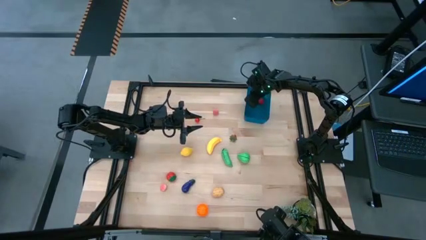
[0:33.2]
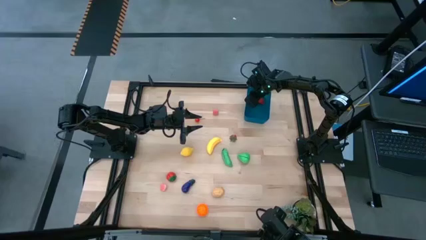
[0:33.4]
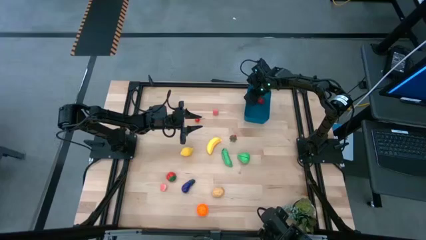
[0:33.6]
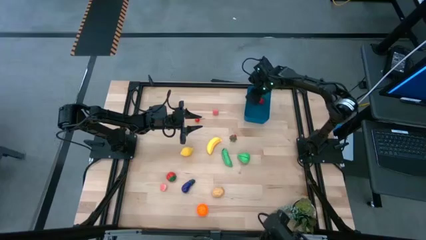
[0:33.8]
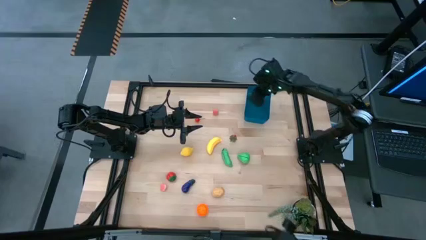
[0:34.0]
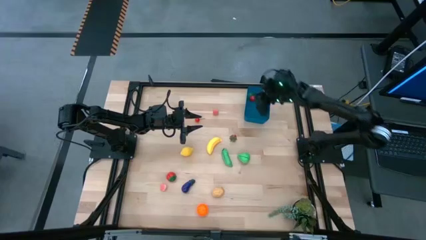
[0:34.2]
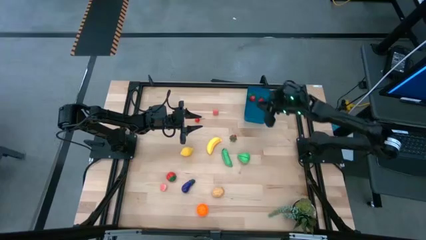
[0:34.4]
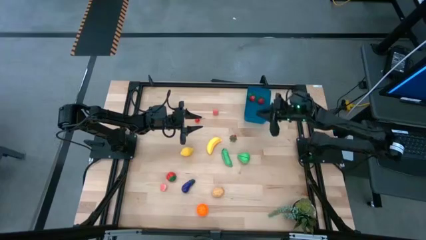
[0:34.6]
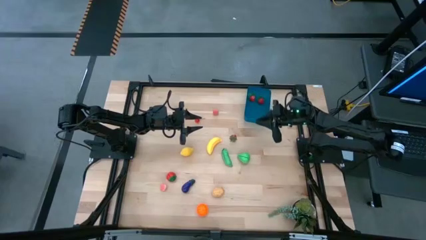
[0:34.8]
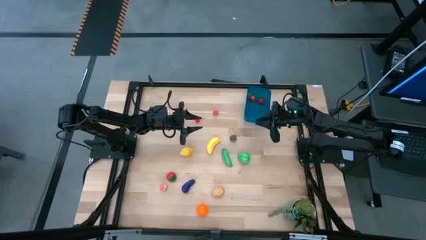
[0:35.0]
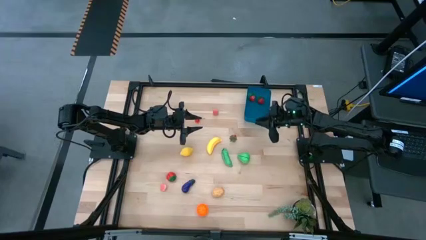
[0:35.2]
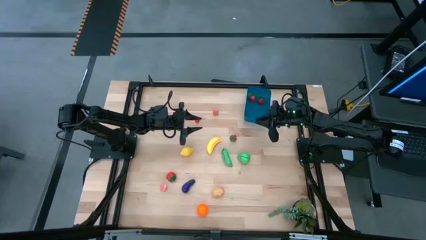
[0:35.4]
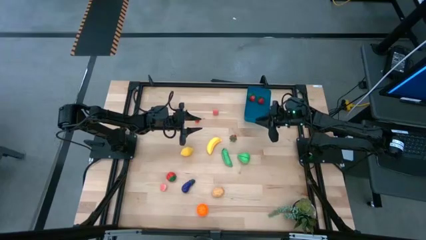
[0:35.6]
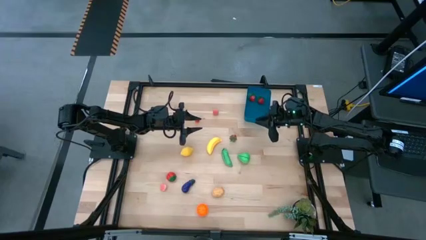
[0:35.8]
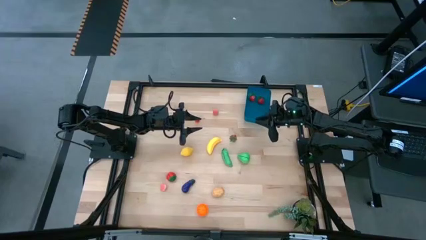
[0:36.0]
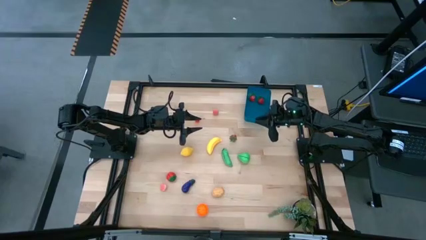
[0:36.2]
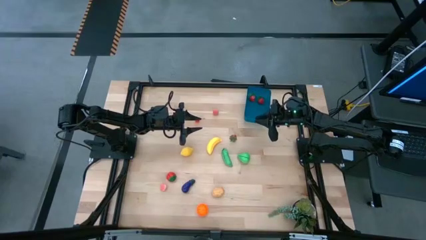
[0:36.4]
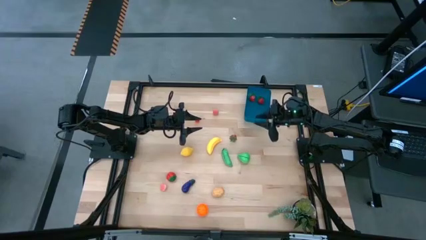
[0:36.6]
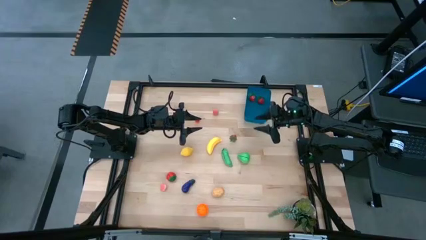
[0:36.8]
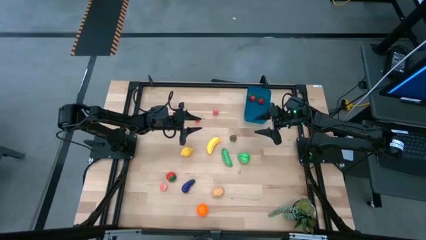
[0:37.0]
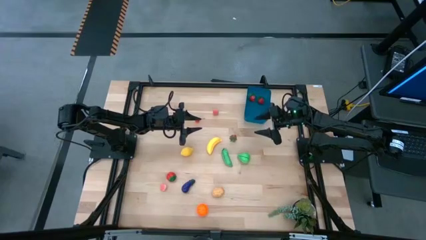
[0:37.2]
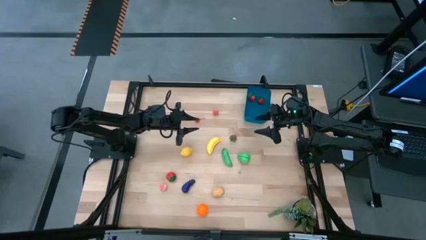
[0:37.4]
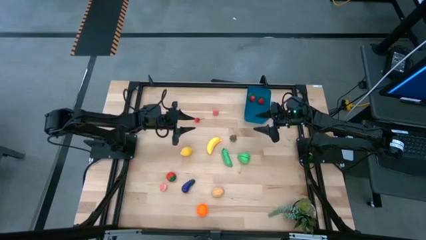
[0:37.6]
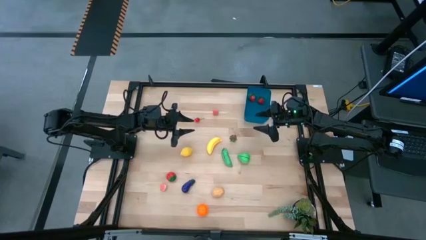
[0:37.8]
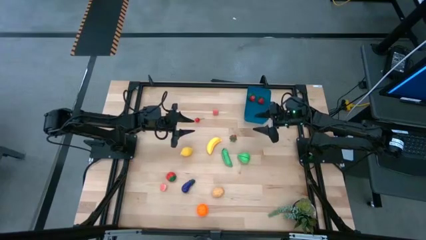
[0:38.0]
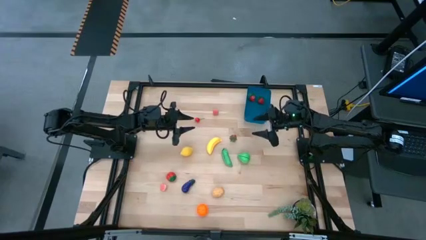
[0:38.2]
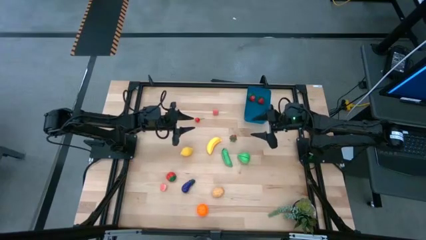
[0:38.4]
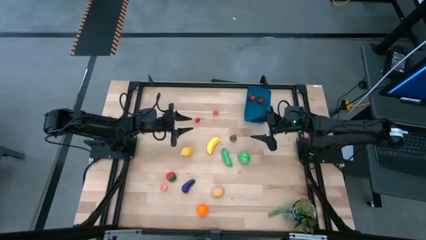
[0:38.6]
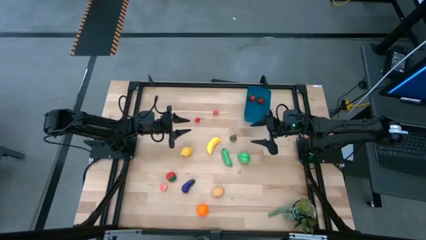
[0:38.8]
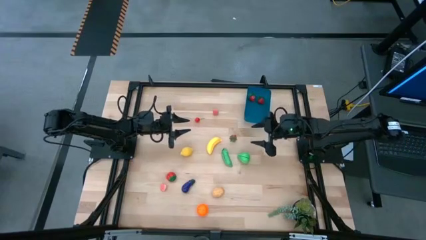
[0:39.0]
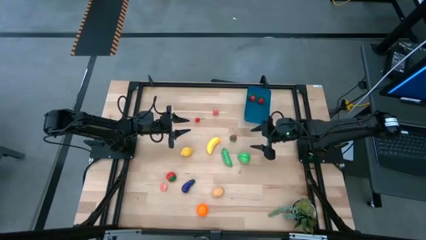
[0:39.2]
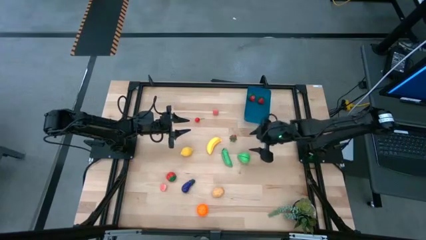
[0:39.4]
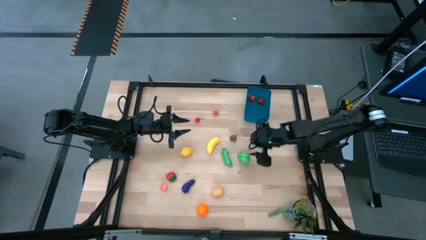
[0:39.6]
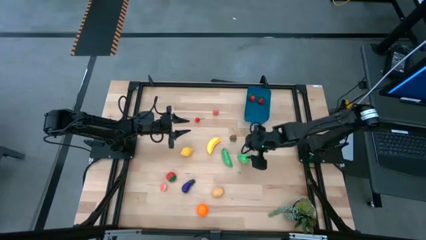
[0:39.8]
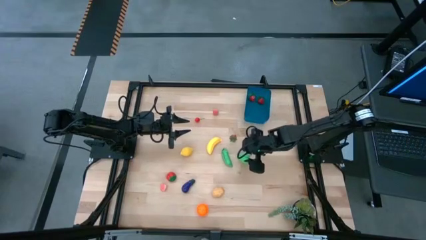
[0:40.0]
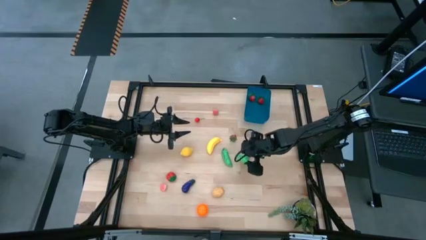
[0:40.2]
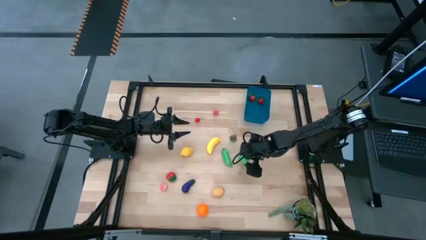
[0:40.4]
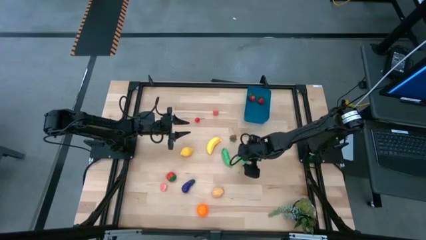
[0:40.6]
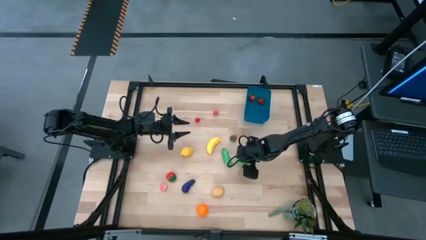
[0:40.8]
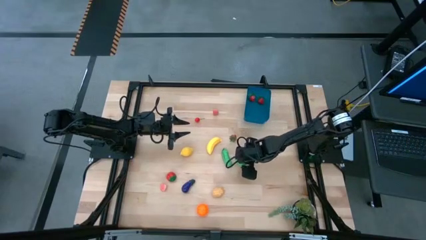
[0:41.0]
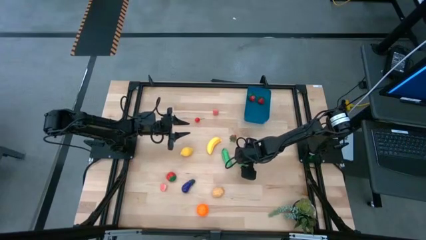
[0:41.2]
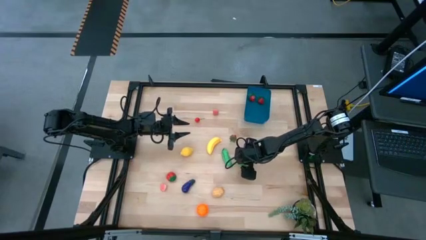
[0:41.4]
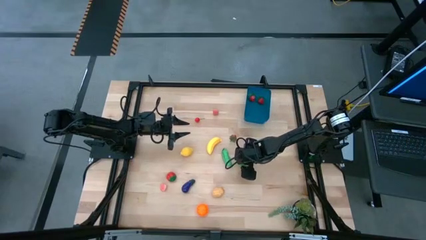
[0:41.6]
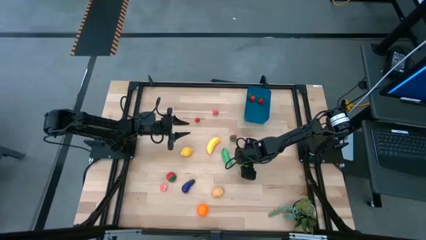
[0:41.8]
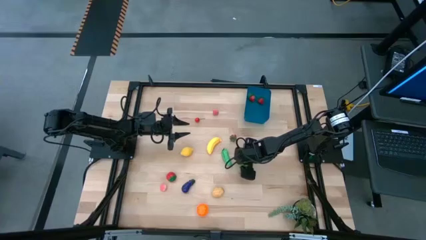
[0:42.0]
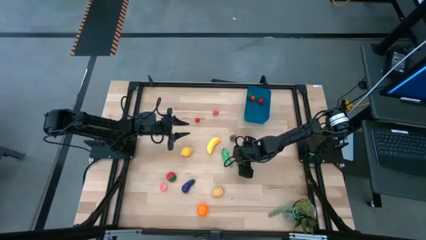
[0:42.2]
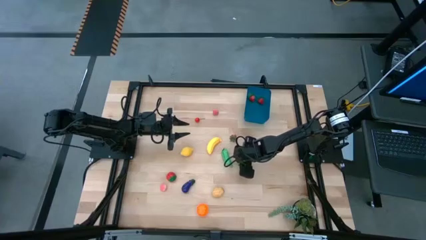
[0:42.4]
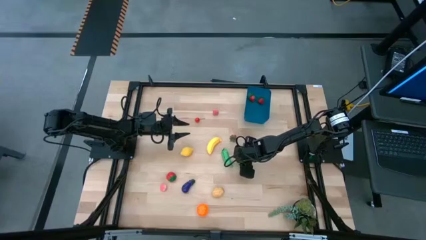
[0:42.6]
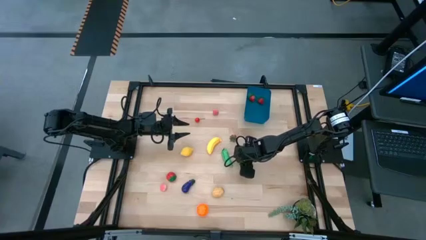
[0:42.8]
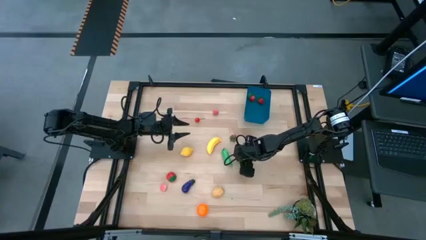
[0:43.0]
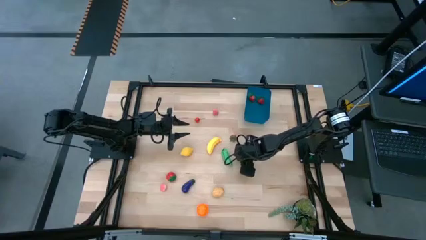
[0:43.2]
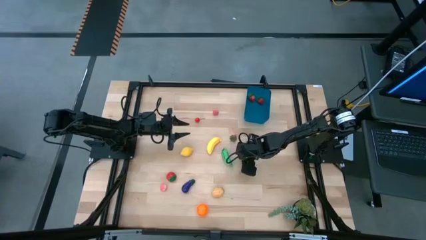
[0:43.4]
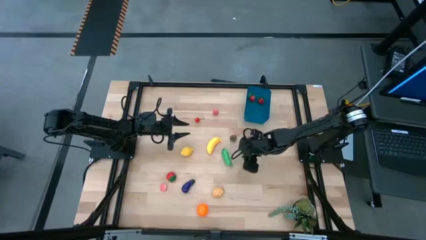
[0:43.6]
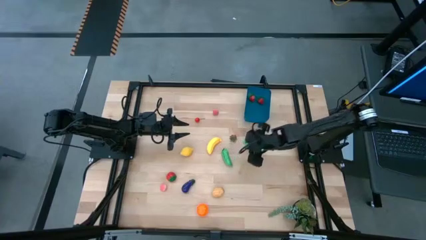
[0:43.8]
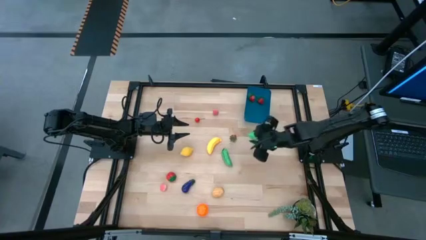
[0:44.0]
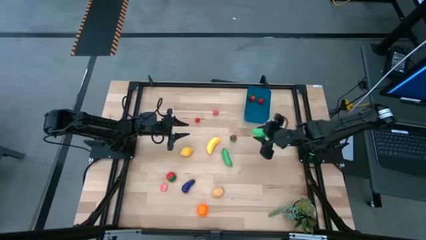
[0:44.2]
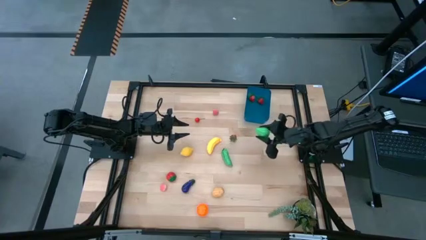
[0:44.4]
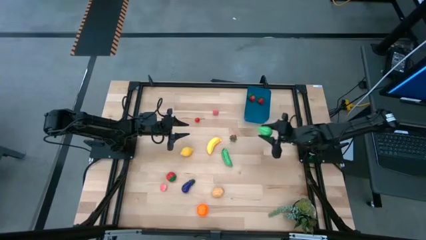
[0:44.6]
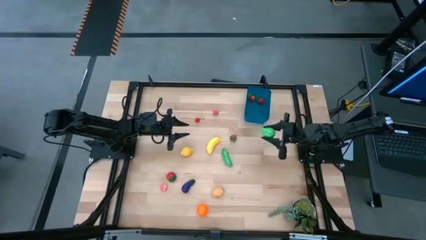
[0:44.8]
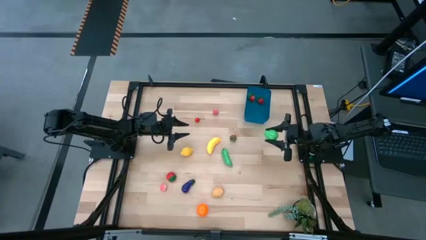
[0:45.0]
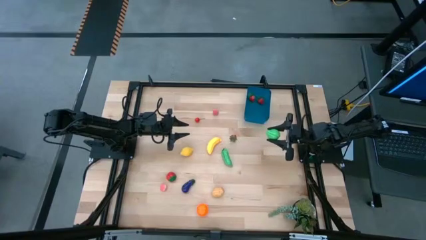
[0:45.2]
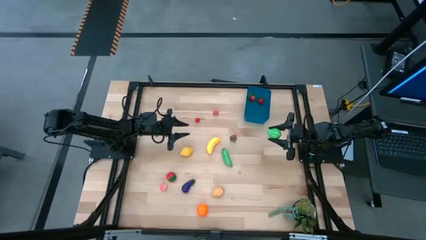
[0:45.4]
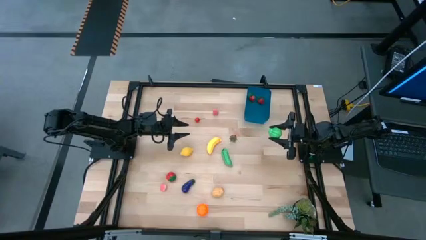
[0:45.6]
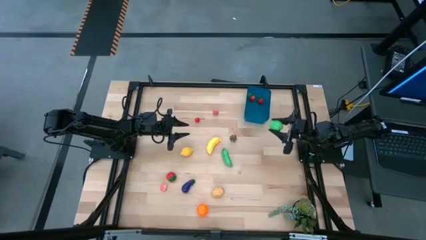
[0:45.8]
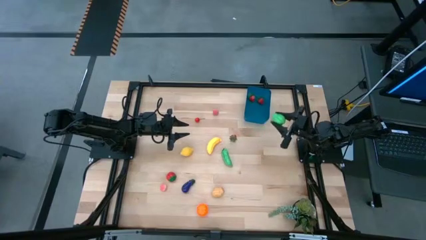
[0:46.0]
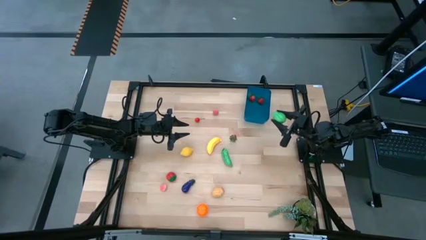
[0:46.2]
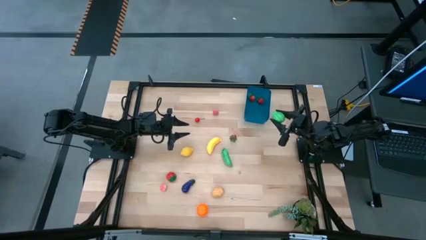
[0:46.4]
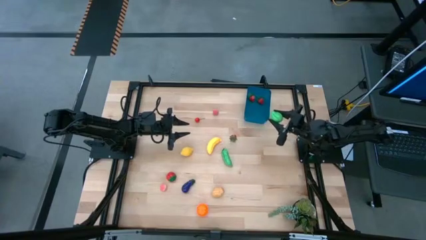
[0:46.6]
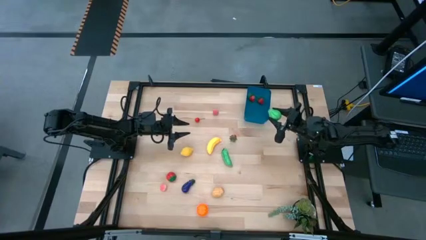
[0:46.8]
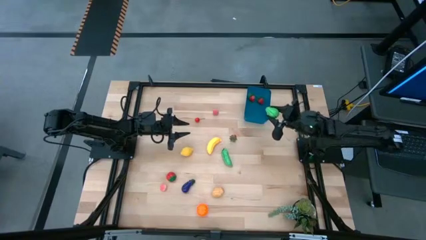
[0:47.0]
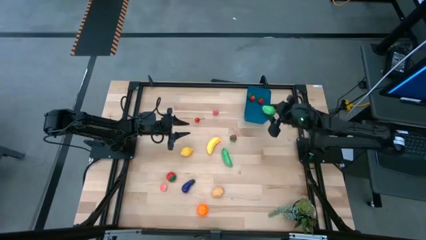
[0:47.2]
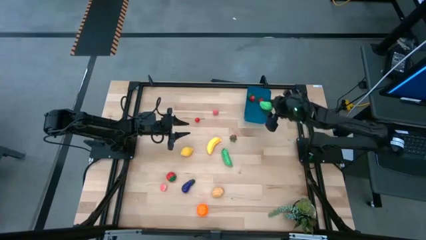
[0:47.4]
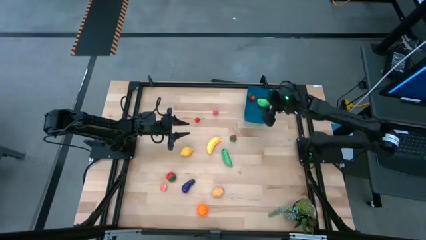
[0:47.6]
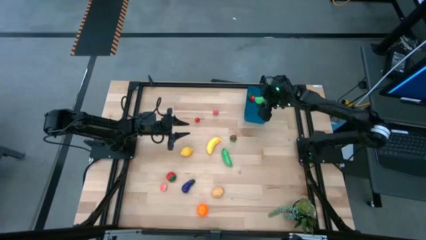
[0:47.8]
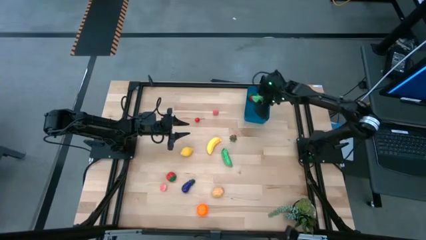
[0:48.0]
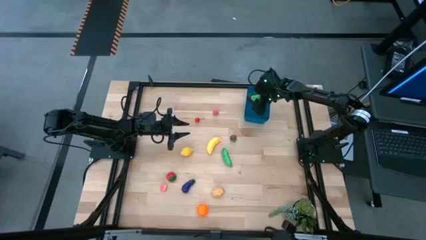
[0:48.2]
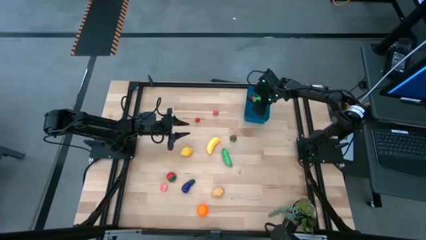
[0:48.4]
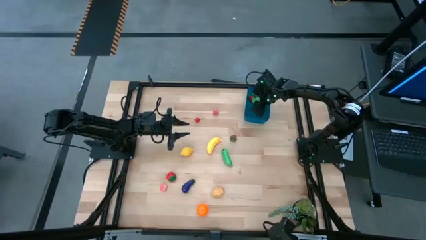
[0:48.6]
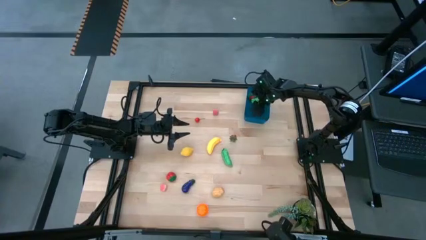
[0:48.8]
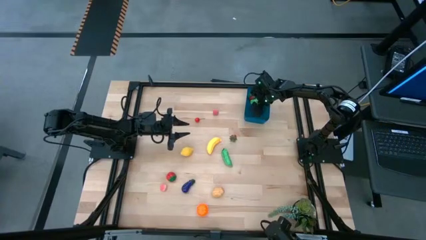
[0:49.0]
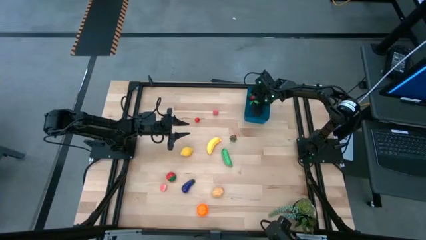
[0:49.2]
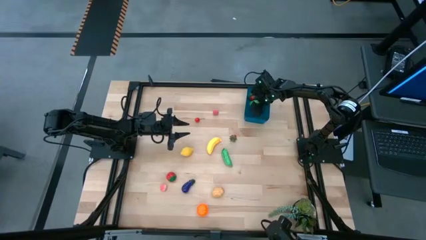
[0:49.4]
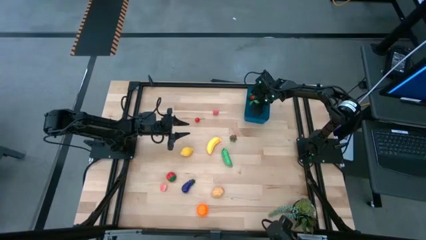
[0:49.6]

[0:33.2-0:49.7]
Task: Pick and placing Produce into tupperware
Put the green pear into the blue bin
